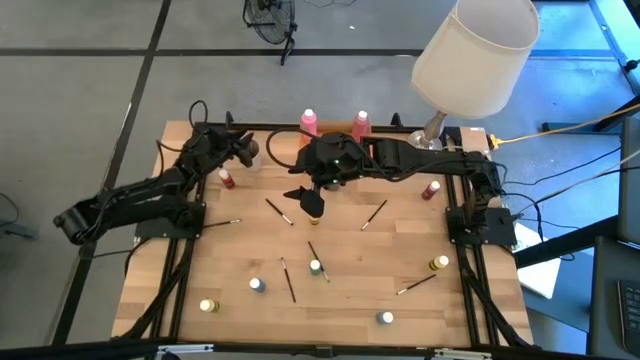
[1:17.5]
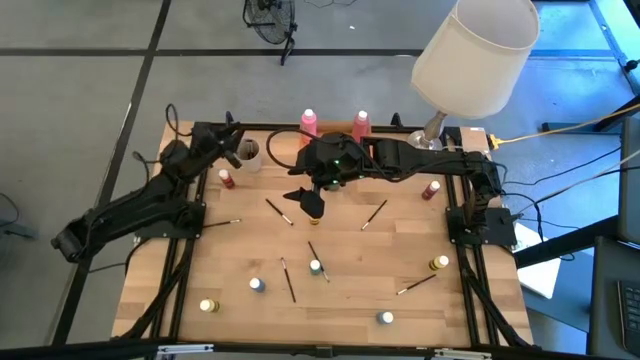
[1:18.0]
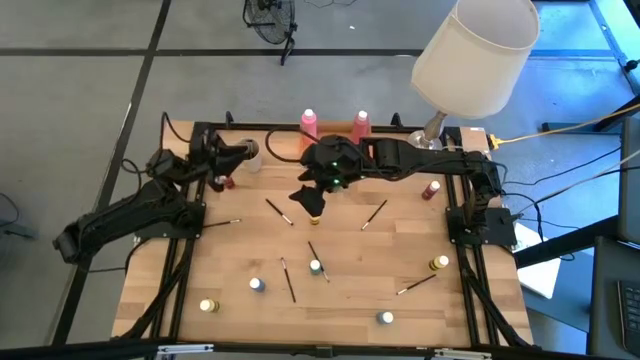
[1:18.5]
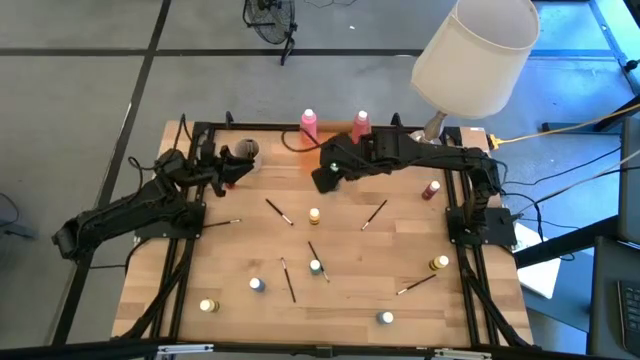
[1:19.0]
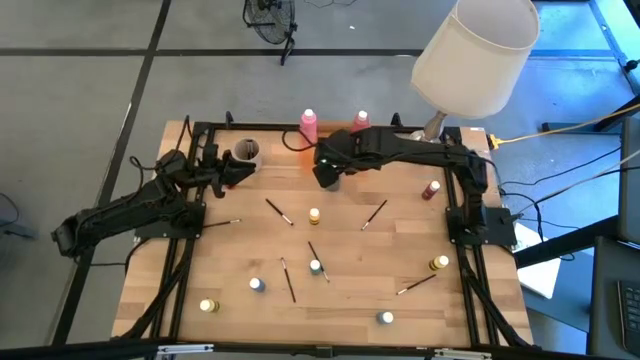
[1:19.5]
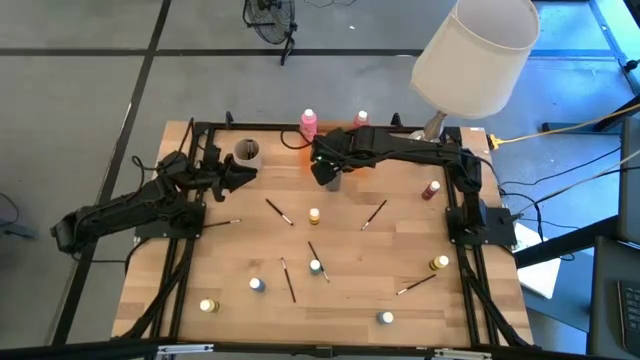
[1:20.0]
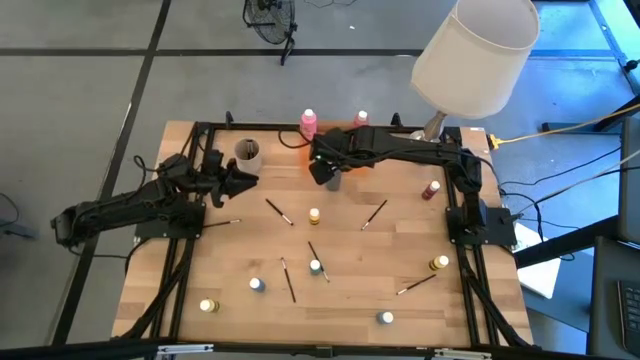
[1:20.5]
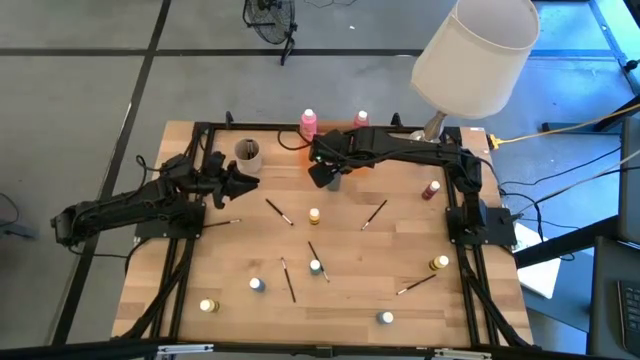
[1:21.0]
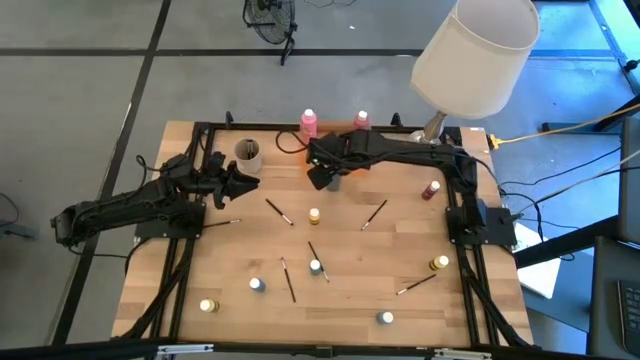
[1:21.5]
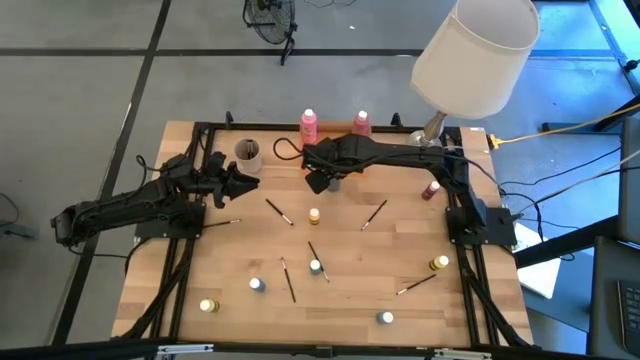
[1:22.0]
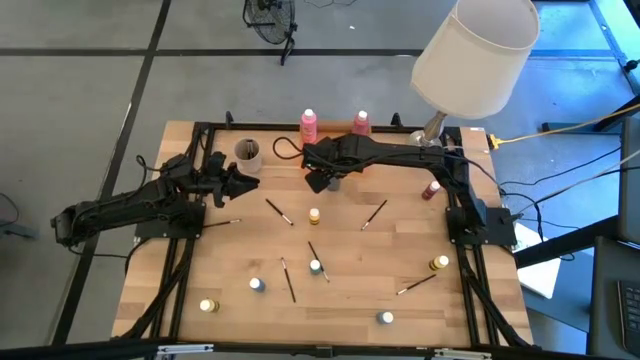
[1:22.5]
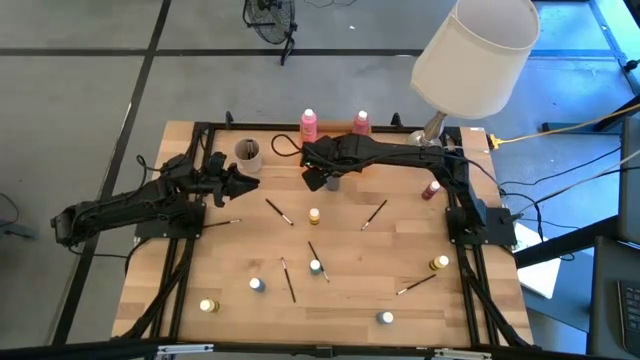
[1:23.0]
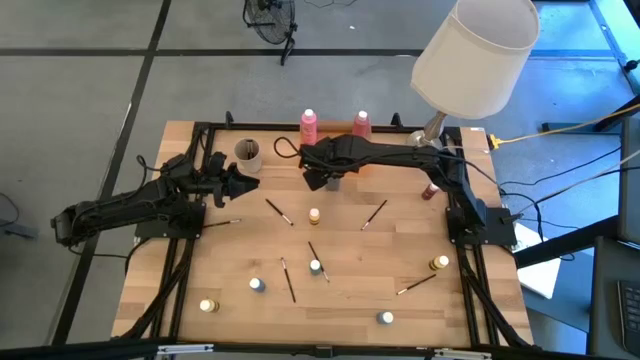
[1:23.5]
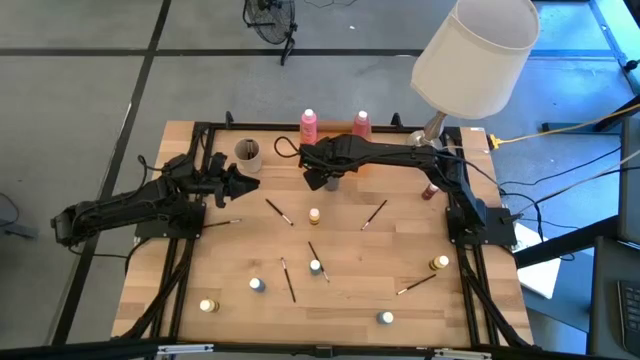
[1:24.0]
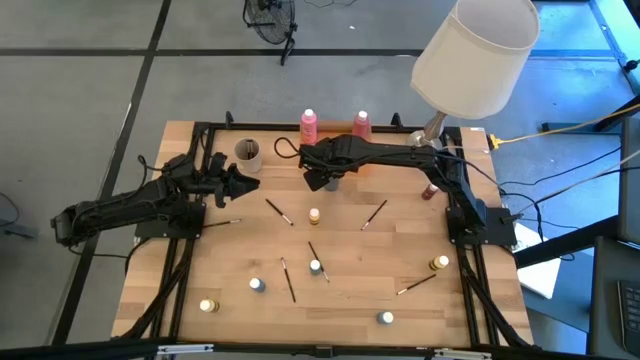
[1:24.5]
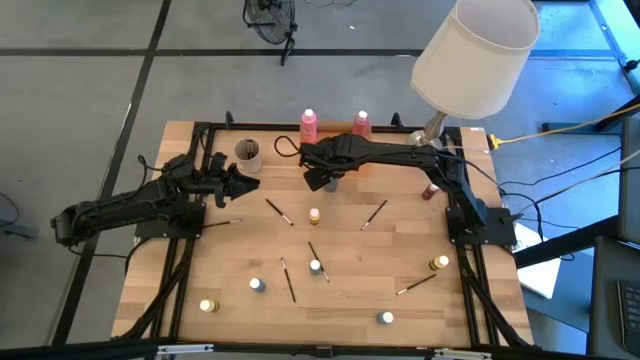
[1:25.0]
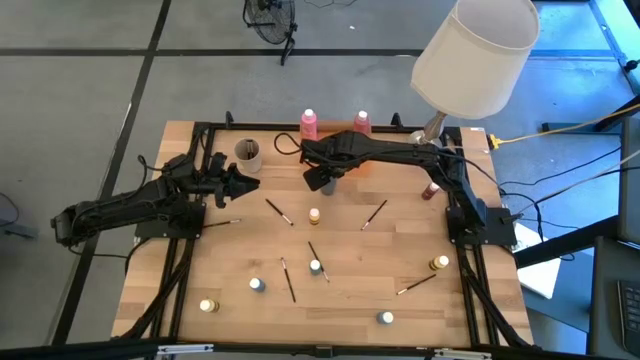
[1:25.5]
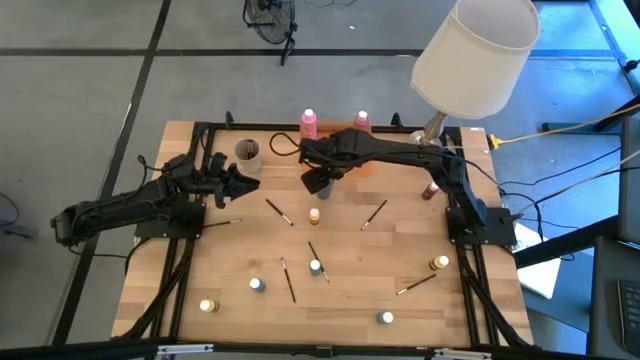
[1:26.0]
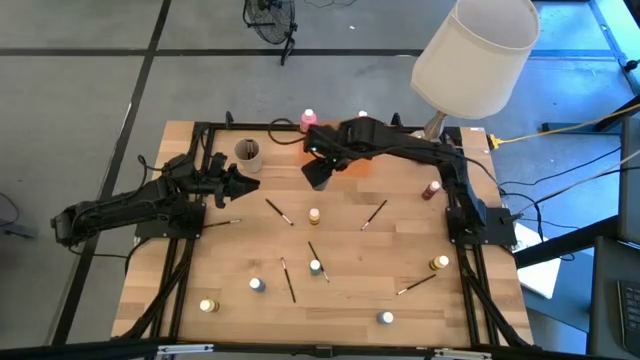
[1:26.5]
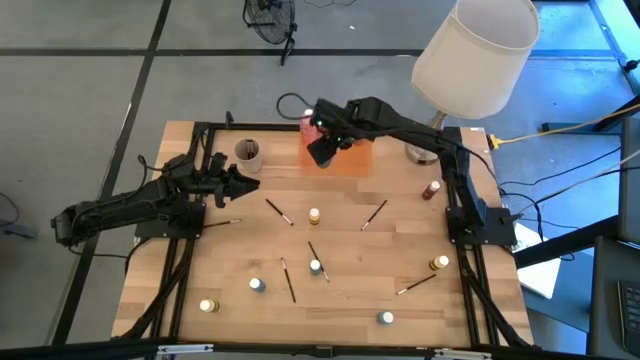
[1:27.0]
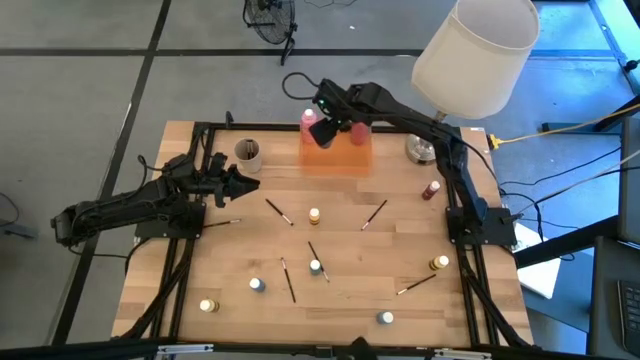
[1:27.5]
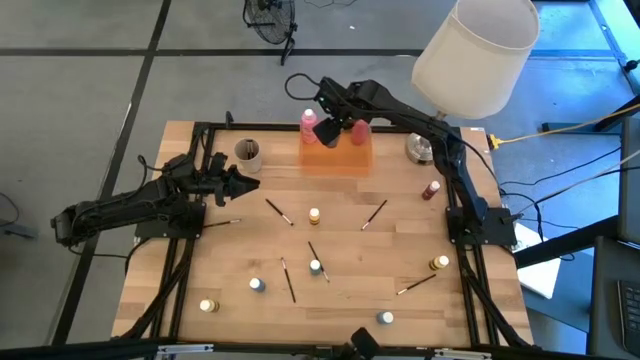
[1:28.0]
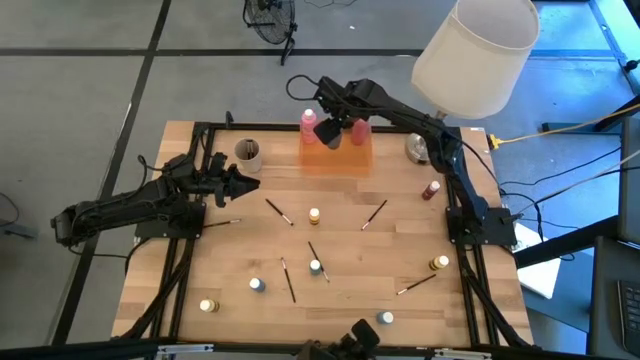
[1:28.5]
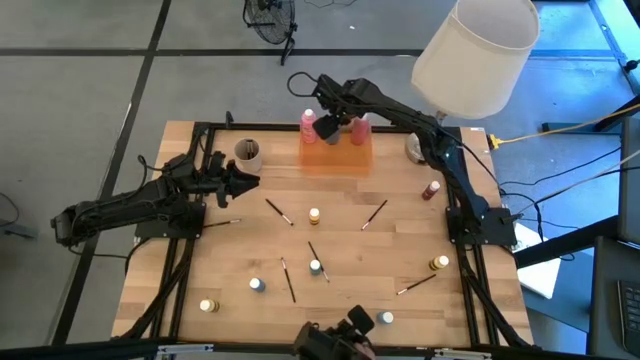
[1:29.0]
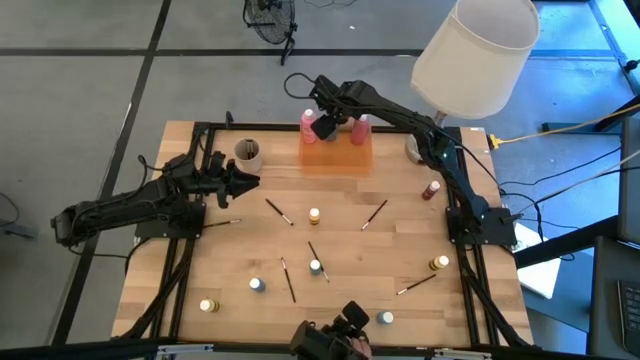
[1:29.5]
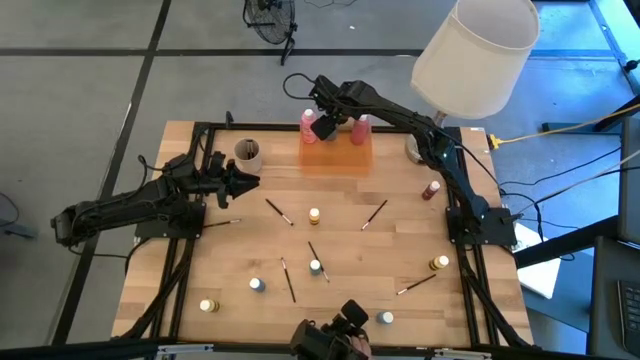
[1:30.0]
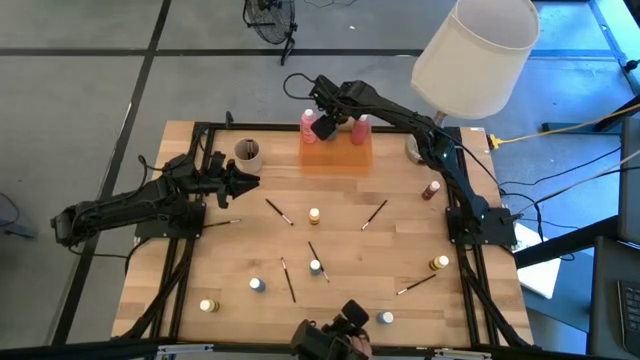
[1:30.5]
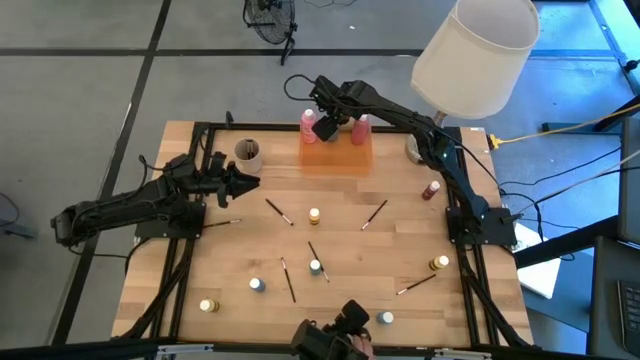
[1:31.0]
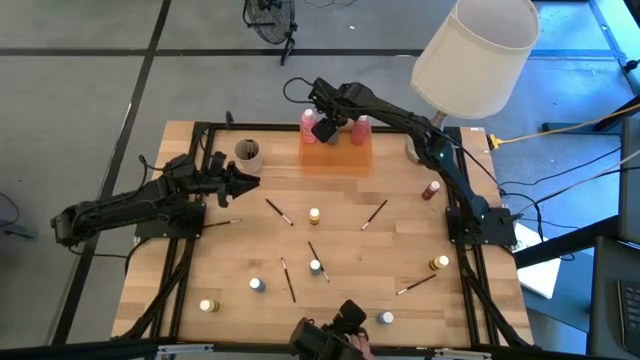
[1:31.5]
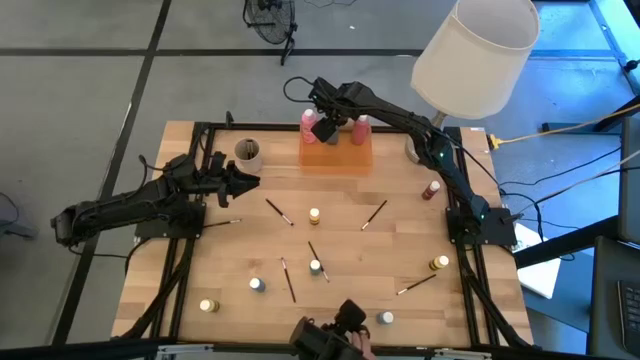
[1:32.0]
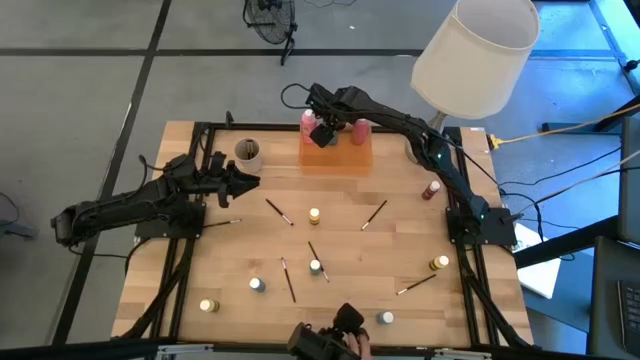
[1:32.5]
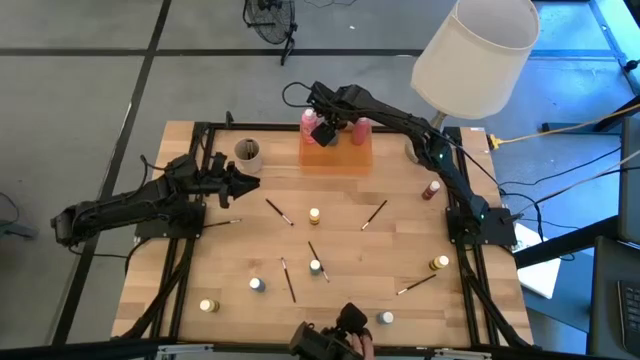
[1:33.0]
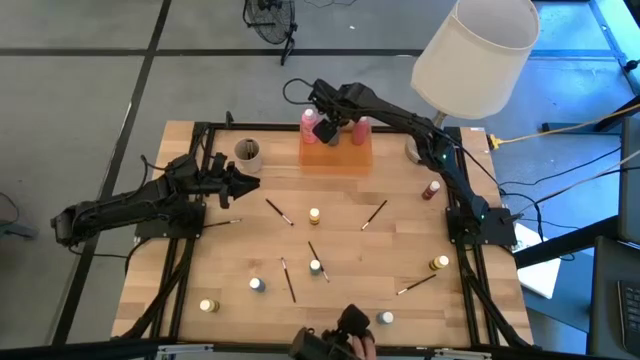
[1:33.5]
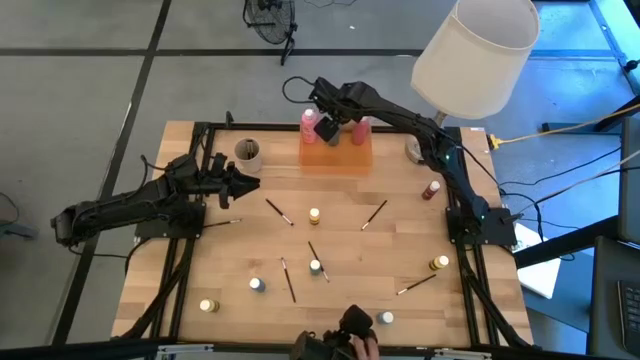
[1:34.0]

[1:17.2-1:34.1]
Task: Pick & Place Paint Supplies
Put the black paint bottle into the orange bin
